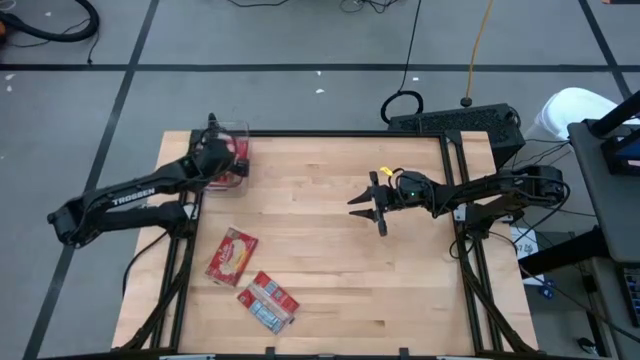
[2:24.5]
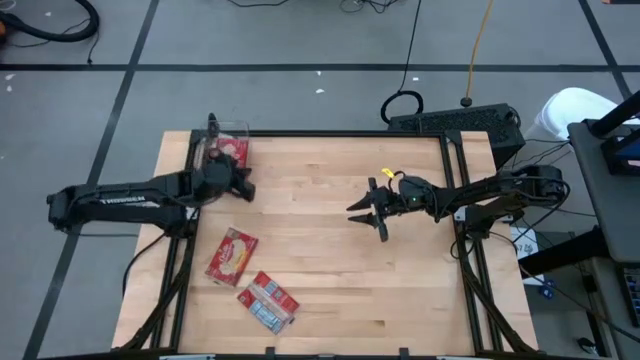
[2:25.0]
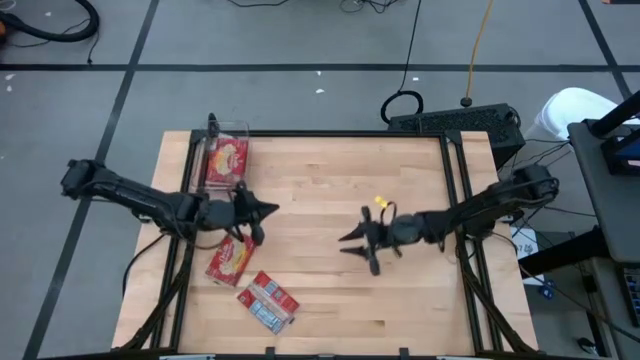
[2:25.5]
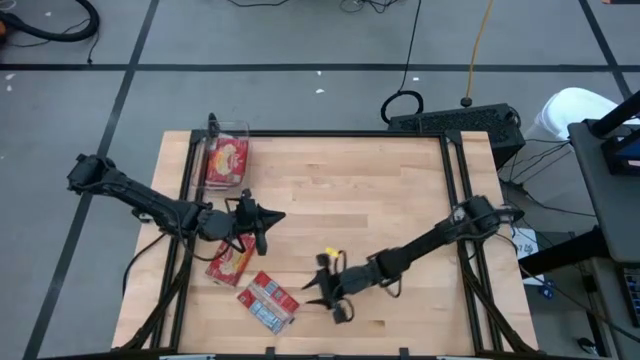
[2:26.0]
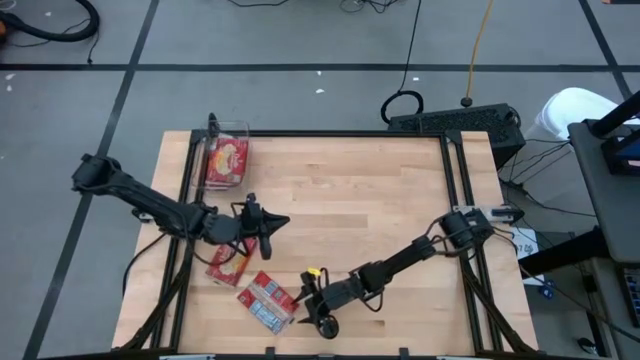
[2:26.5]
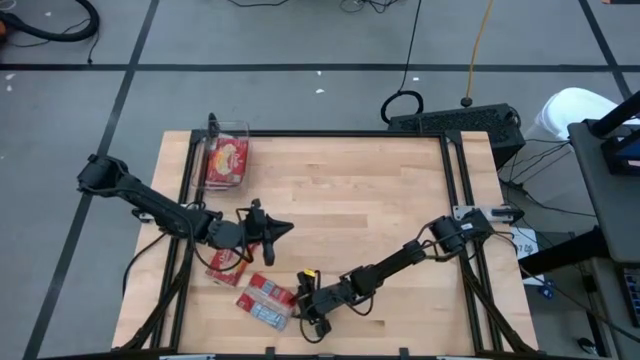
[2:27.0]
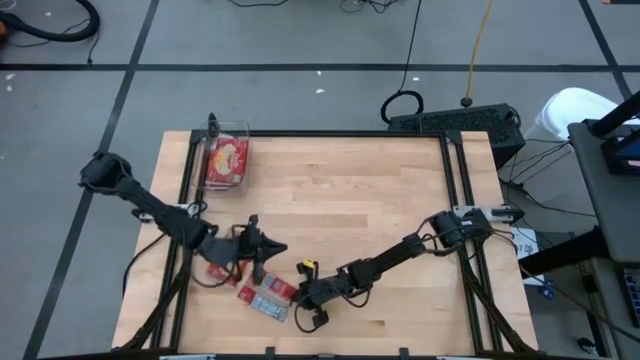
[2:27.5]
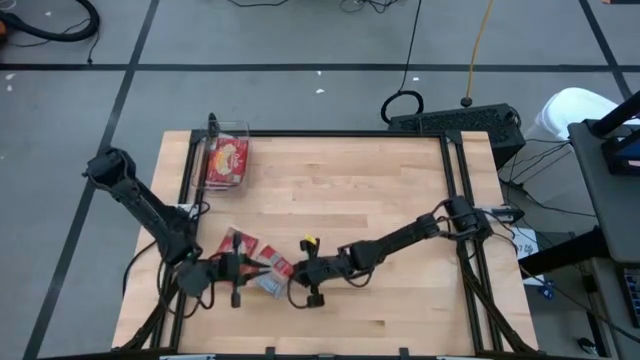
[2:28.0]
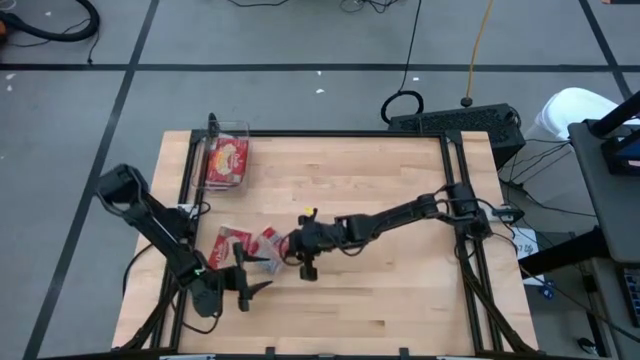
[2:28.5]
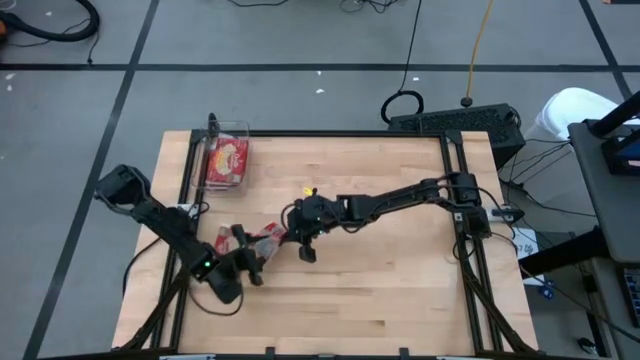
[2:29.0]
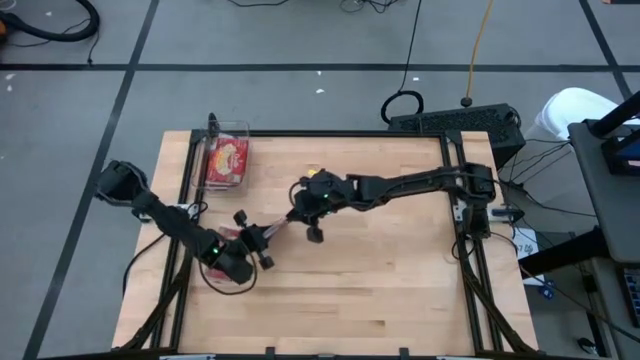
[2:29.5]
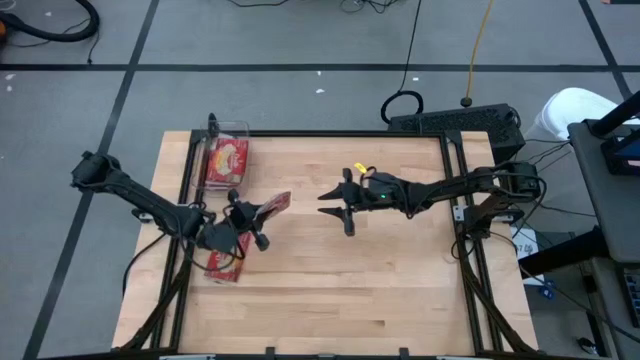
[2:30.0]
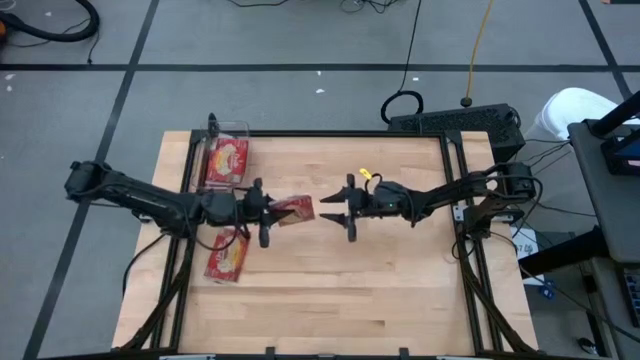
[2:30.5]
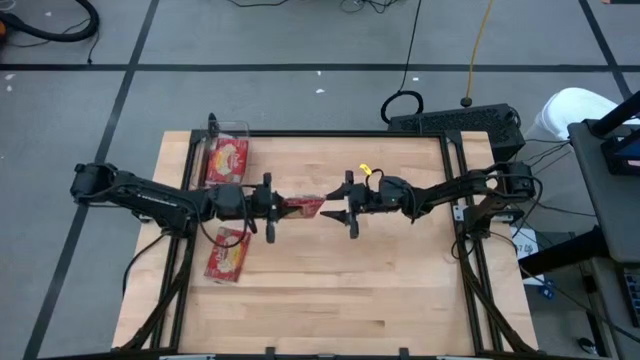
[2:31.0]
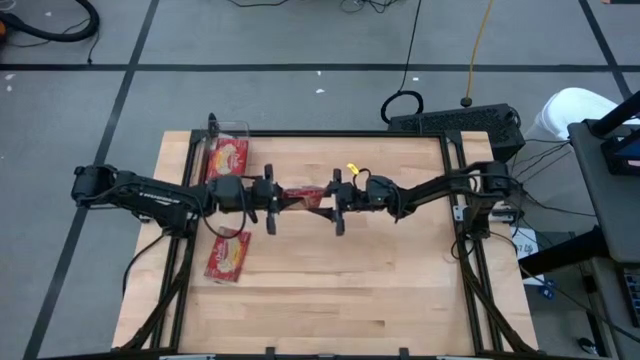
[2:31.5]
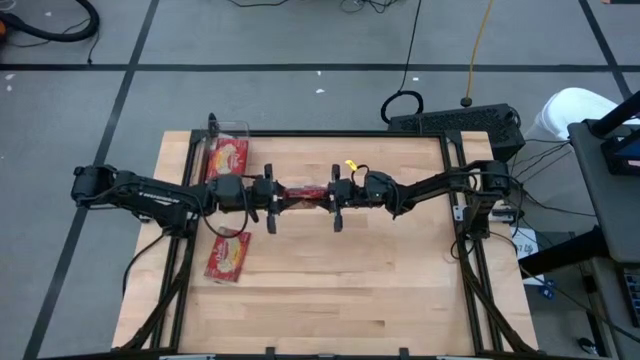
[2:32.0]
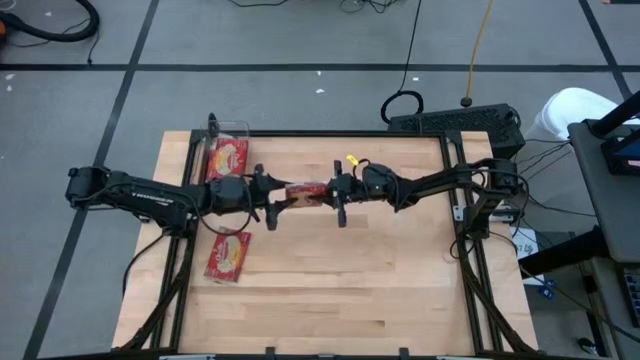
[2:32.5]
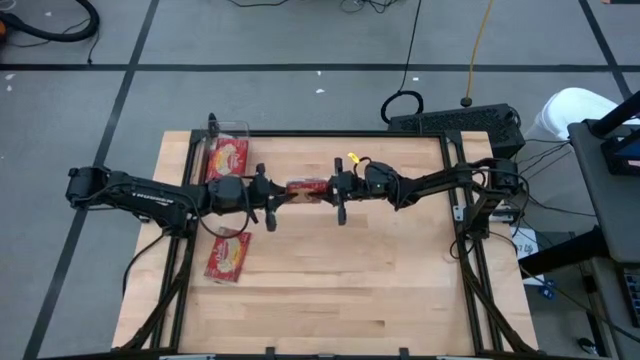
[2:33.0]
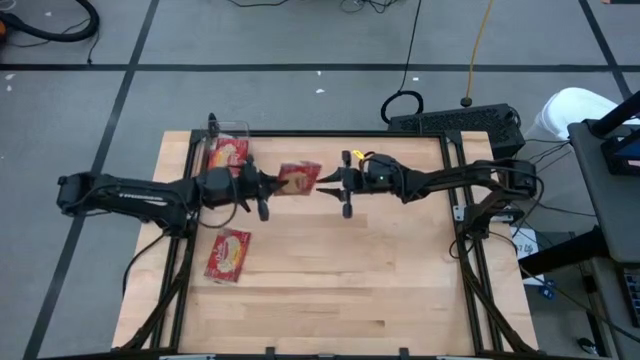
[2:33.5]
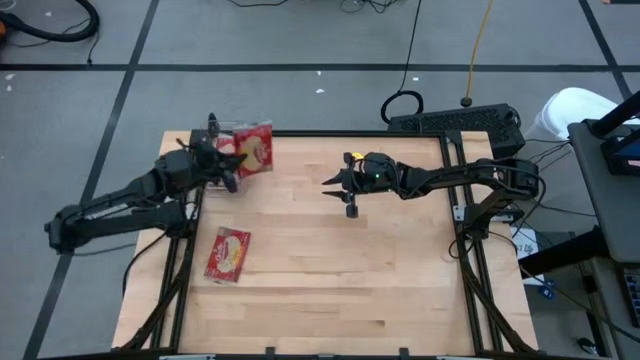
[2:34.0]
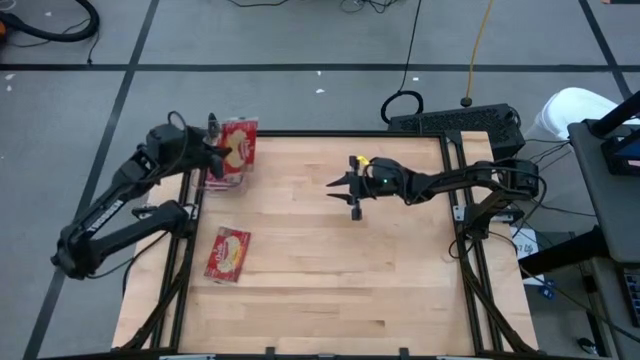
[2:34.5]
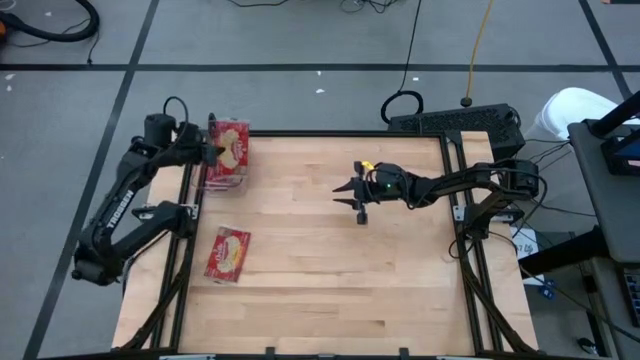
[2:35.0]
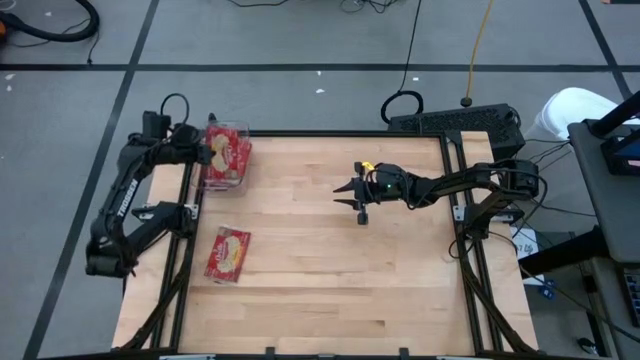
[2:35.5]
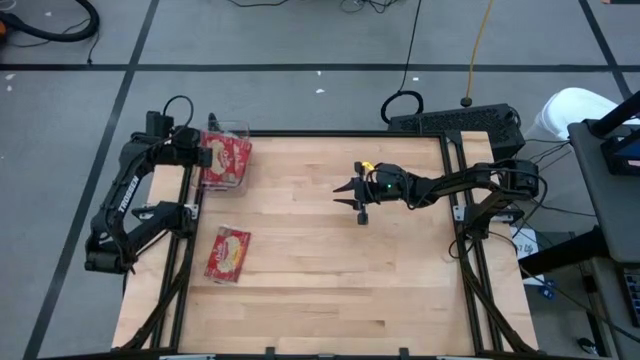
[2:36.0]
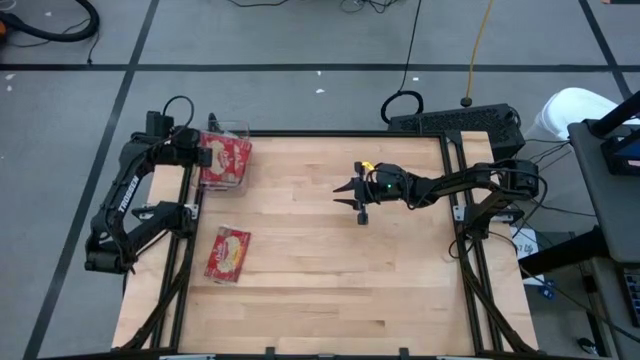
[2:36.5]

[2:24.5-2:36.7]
Task: Sort popcorn bags into baskets
Put the red popcorn bag into the transparent bin

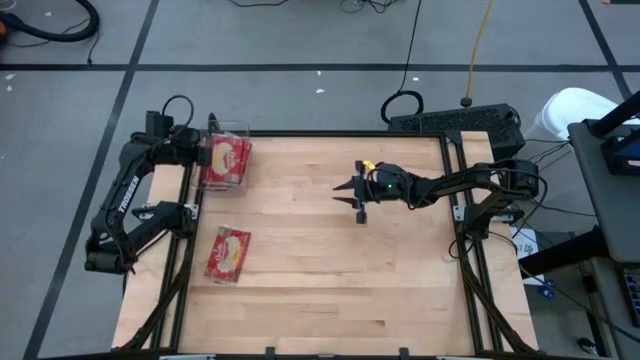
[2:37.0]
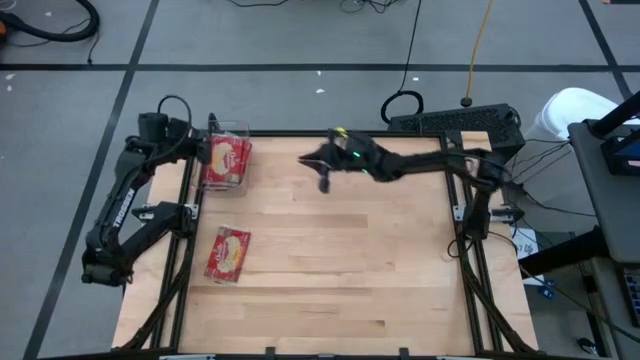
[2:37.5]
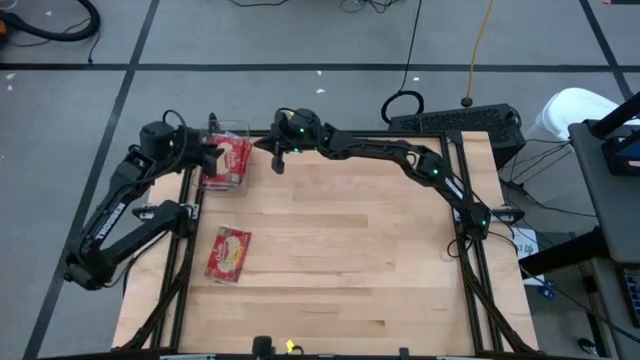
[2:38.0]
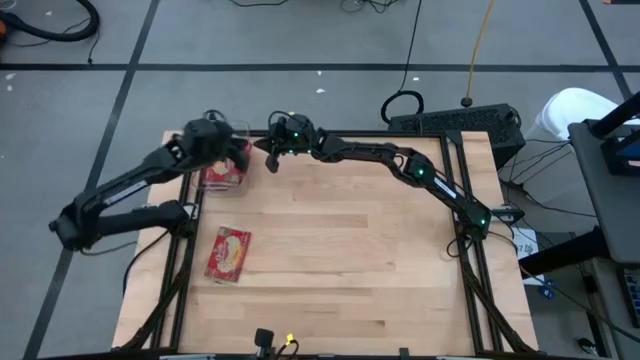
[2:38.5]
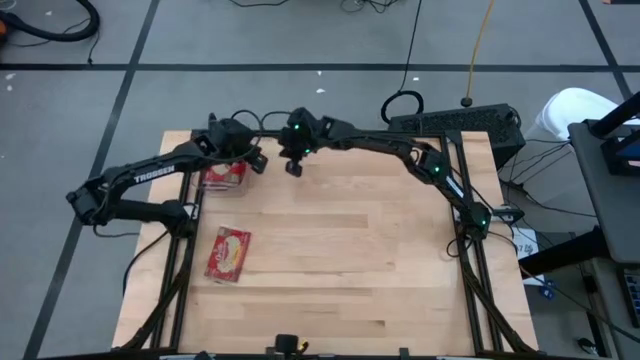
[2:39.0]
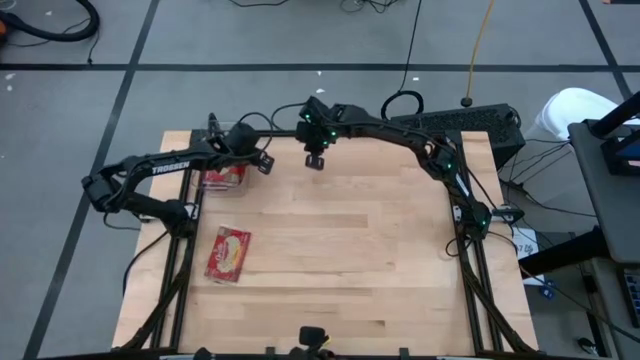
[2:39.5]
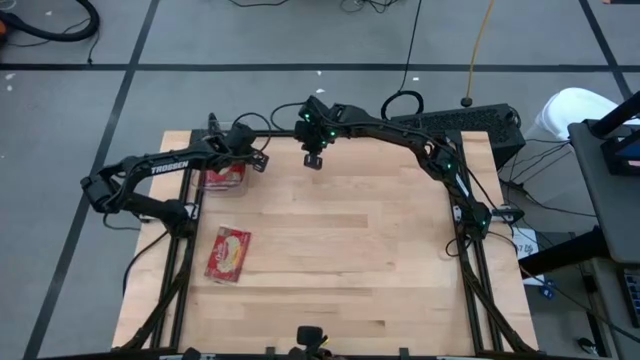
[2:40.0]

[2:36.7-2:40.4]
Adjust the red popcorn bags

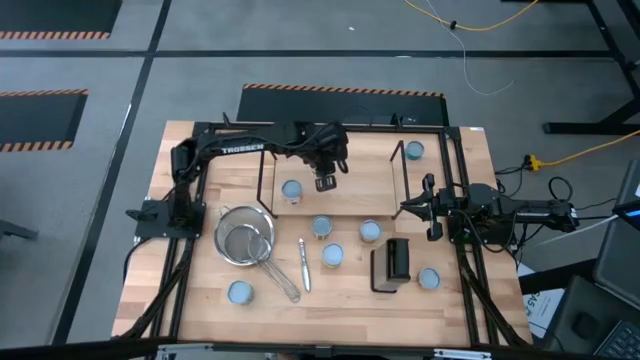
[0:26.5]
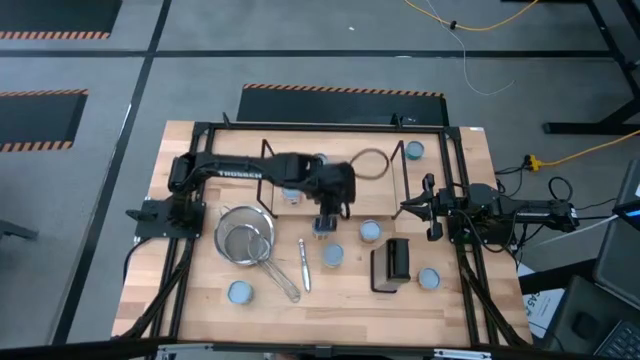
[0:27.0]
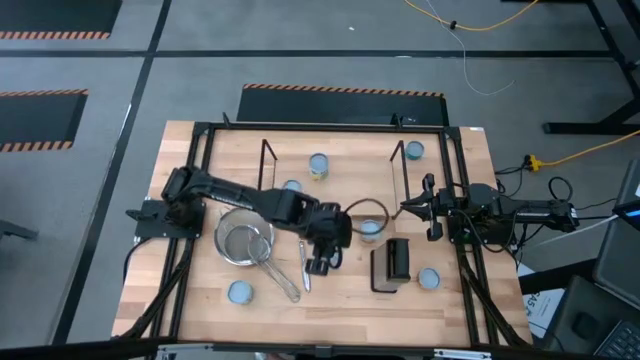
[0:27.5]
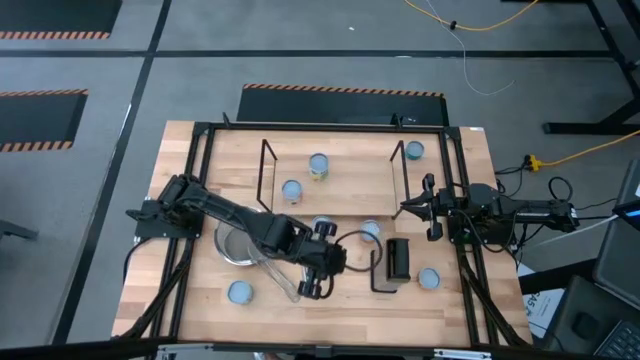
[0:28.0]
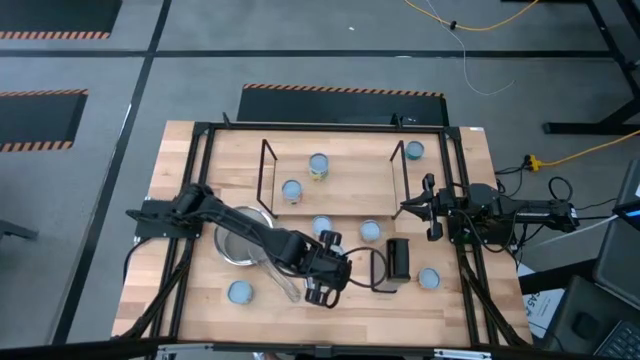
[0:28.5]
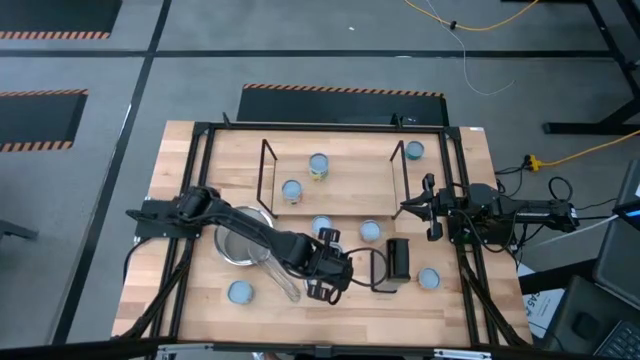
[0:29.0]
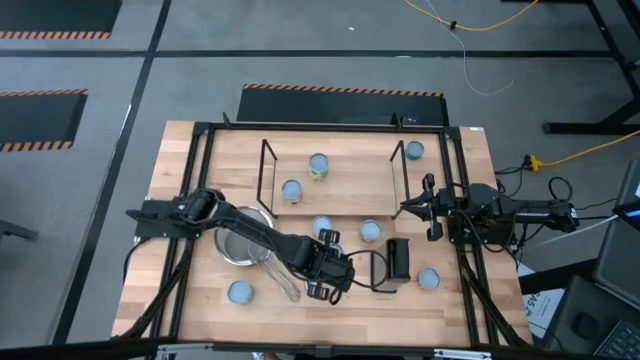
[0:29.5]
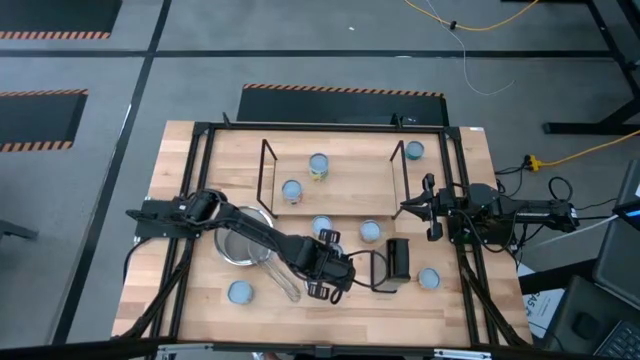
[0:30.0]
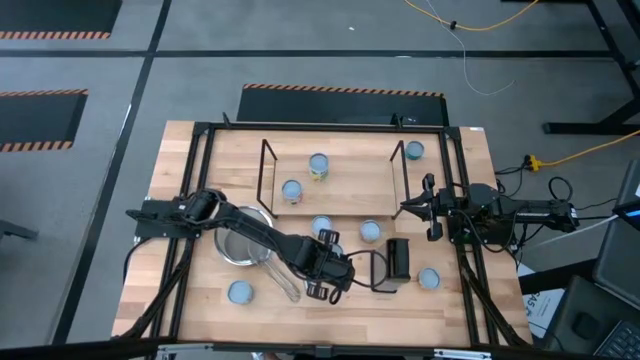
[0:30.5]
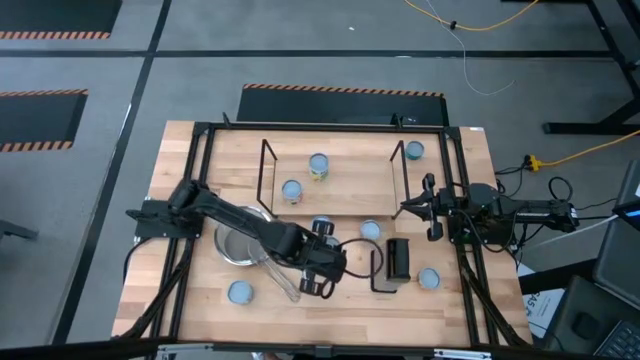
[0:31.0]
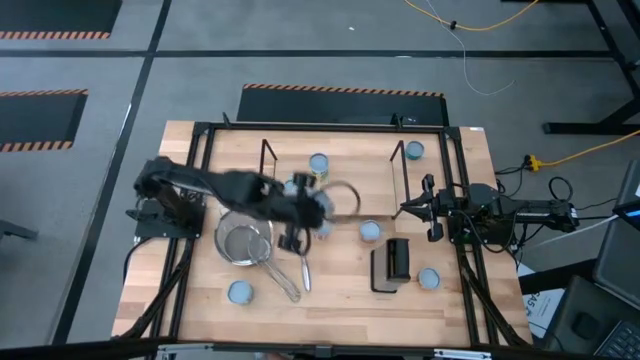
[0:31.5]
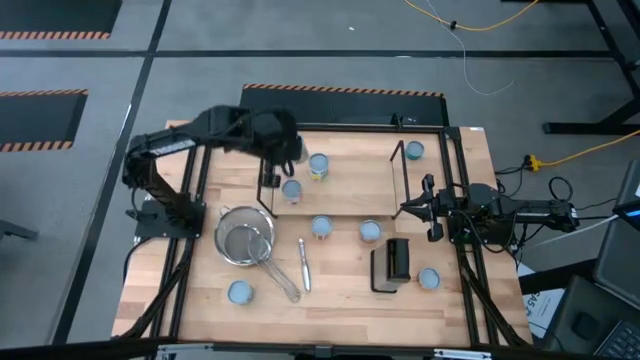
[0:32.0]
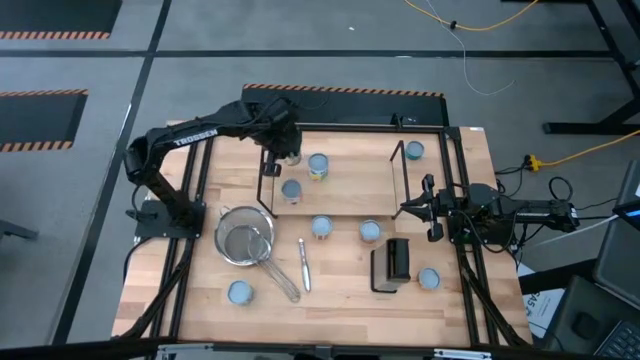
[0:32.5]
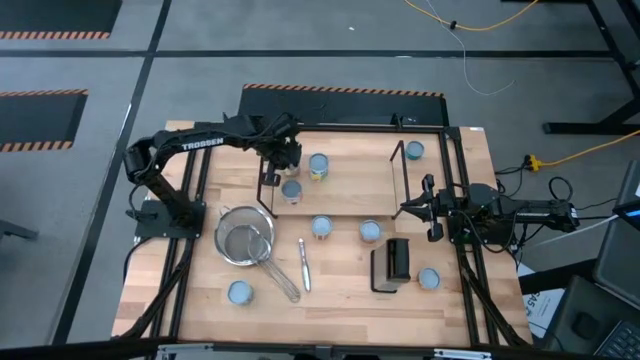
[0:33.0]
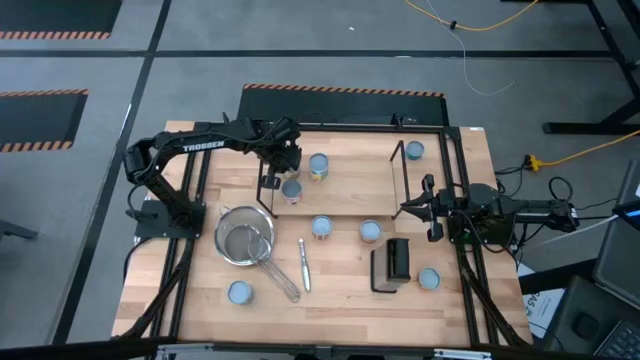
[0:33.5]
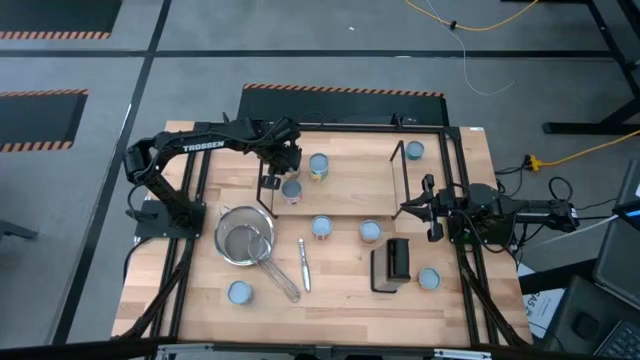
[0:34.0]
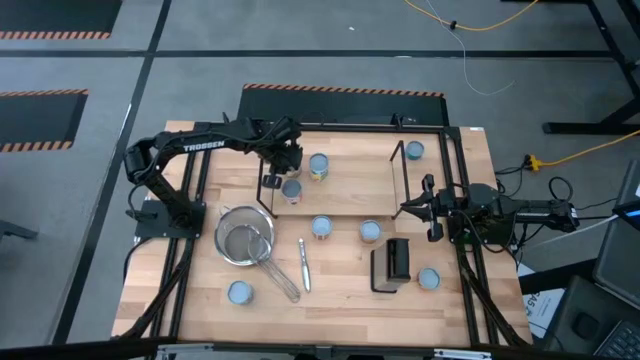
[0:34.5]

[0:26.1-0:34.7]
Task: Pick and place cans onto a shelf
Put the pink can on the shelf aligned with the other orange can
